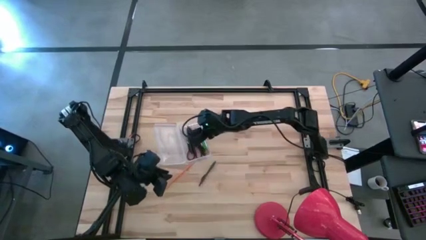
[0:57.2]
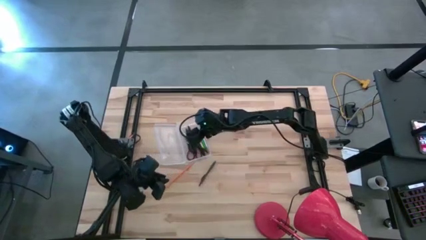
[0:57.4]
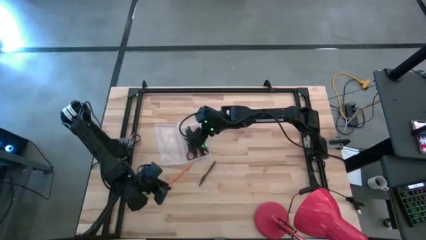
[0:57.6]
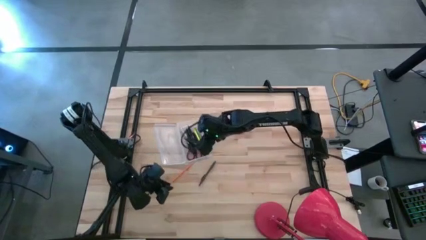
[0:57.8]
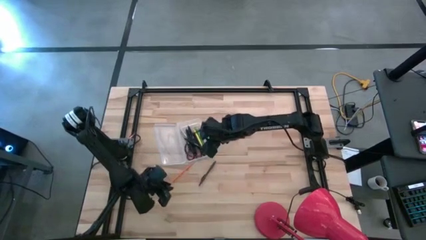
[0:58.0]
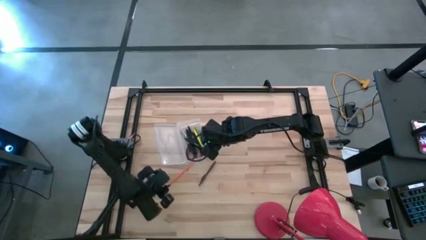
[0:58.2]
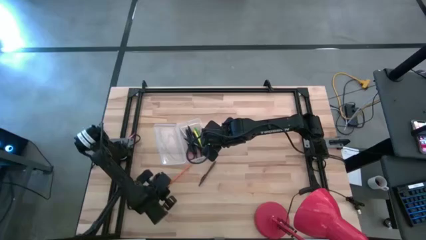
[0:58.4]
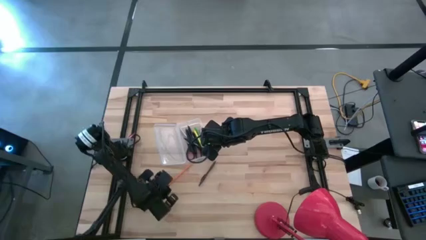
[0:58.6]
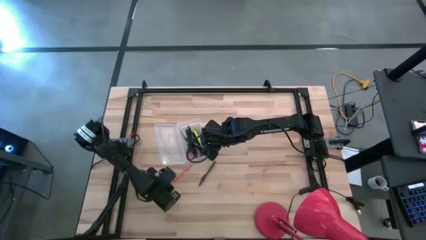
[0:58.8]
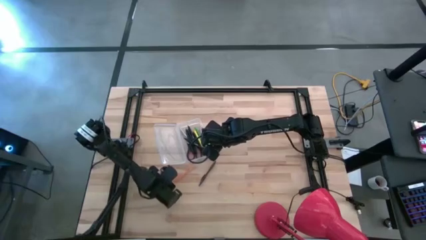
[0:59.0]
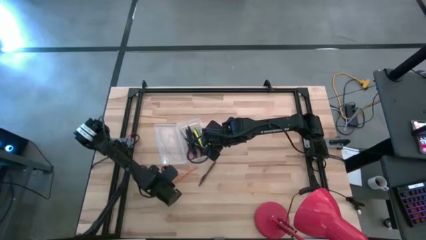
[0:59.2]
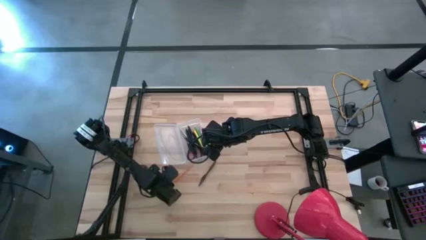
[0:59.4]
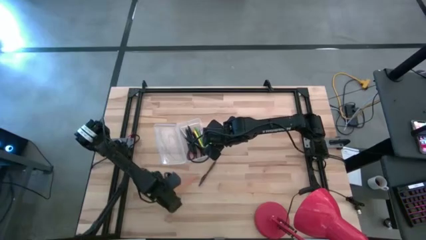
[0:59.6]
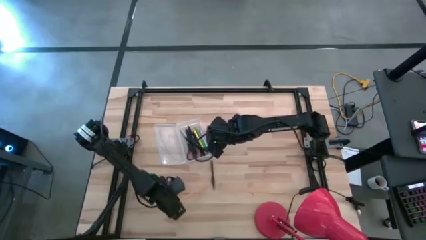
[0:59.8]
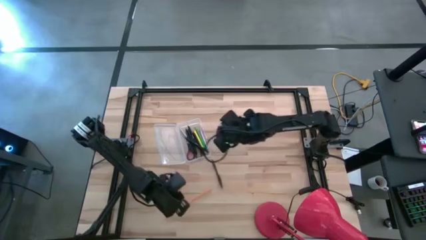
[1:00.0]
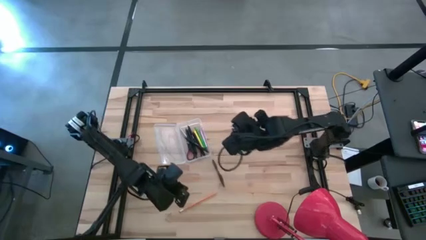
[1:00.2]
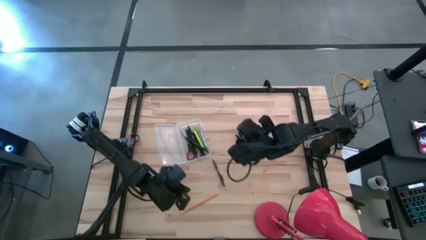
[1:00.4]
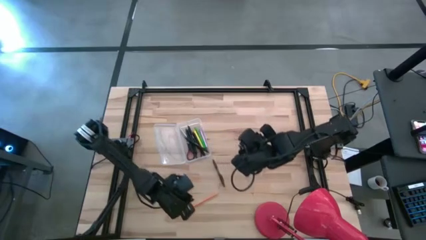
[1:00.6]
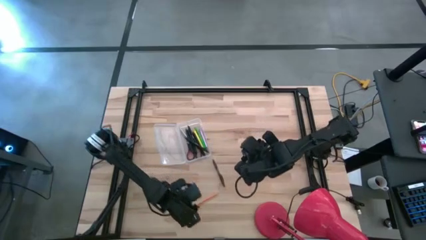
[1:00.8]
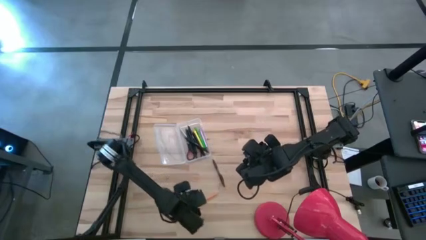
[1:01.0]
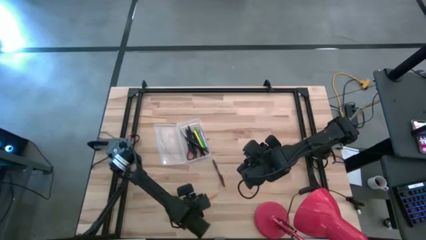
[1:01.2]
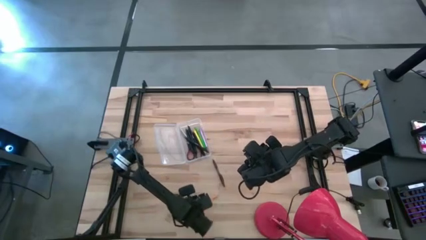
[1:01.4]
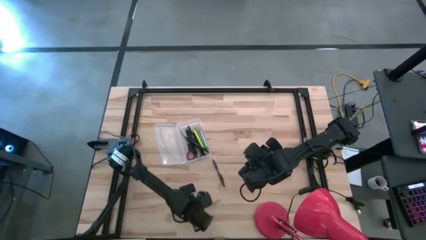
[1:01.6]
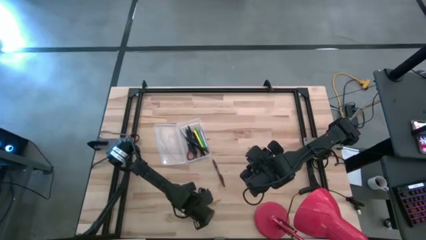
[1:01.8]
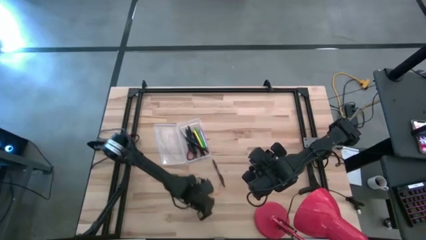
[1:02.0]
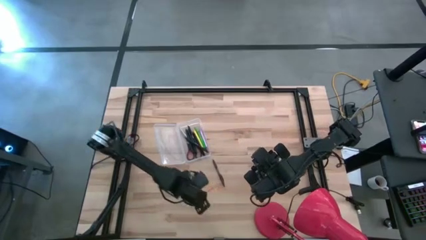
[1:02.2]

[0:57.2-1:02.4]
Task: Pick & place school supplies into a supply box
Put the orange pencil into the transparent supply box

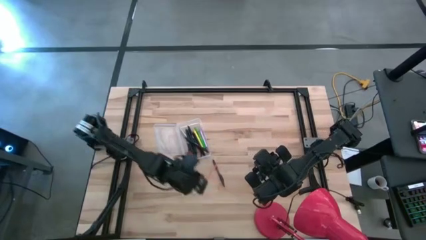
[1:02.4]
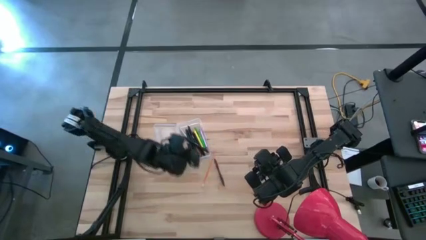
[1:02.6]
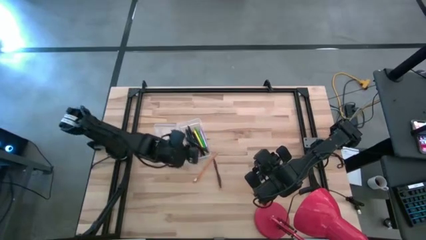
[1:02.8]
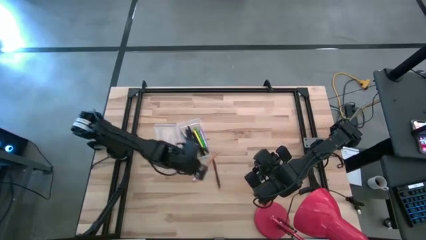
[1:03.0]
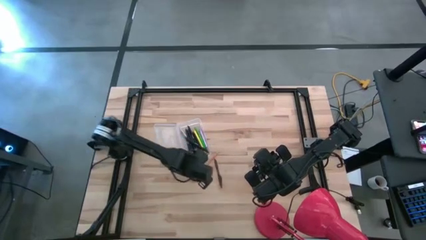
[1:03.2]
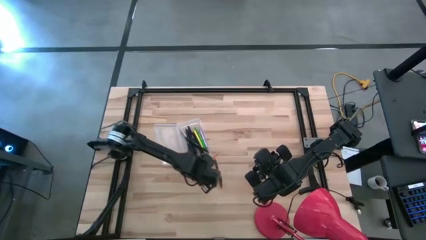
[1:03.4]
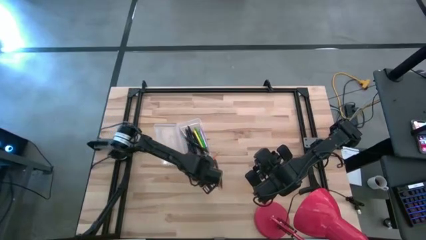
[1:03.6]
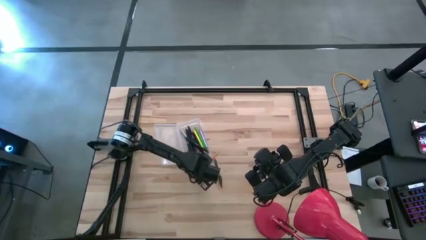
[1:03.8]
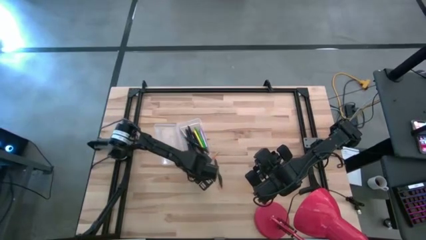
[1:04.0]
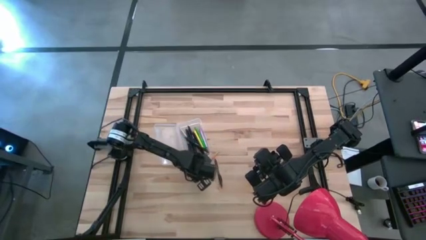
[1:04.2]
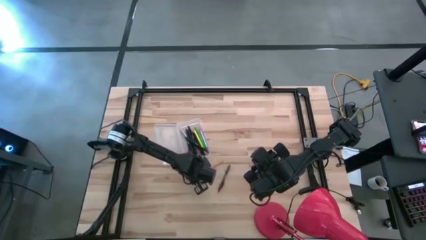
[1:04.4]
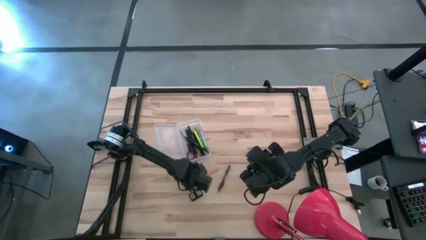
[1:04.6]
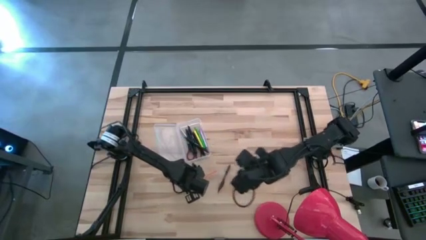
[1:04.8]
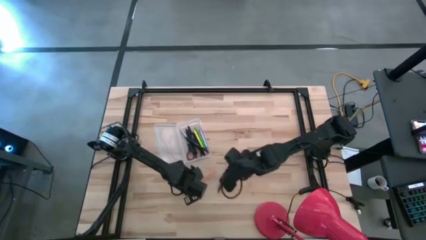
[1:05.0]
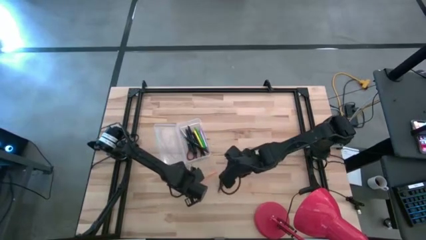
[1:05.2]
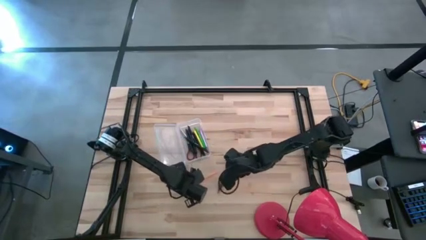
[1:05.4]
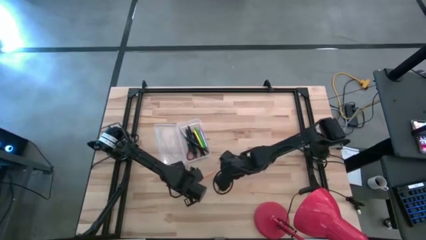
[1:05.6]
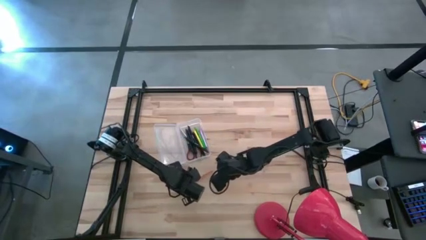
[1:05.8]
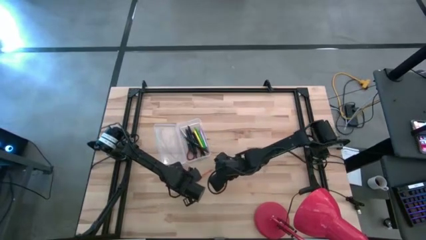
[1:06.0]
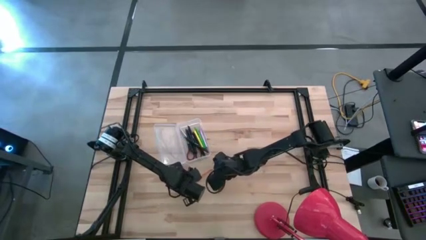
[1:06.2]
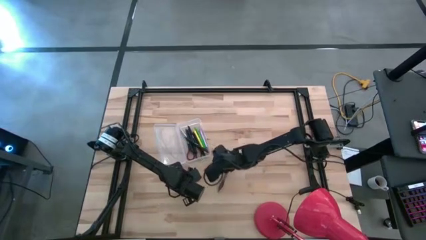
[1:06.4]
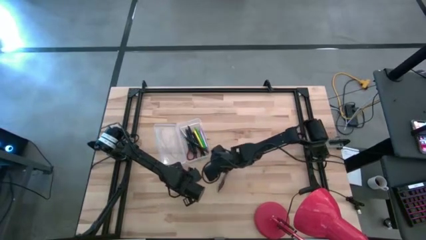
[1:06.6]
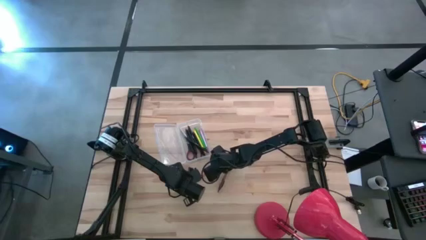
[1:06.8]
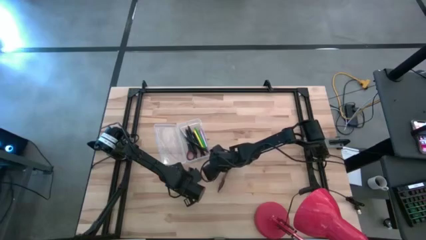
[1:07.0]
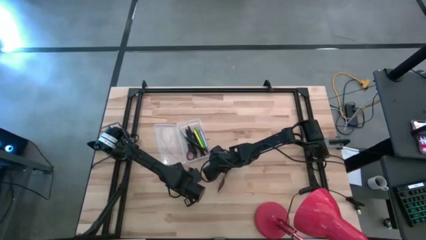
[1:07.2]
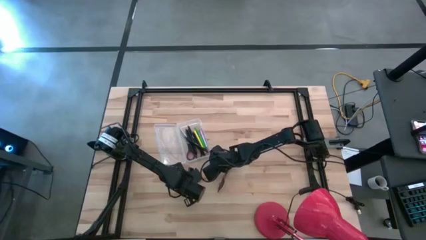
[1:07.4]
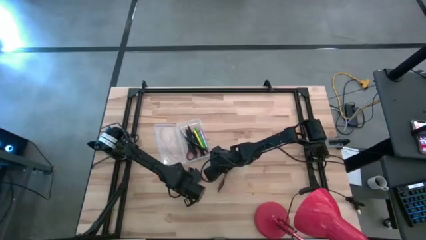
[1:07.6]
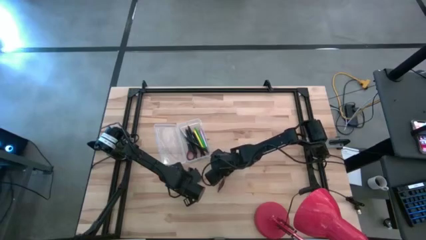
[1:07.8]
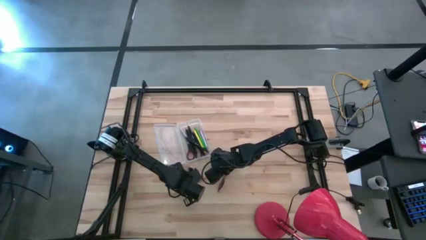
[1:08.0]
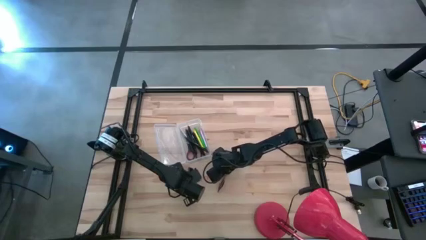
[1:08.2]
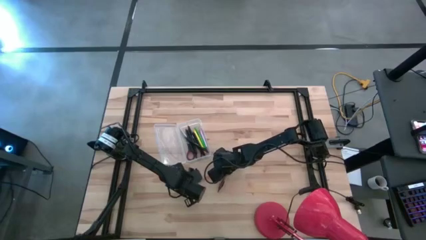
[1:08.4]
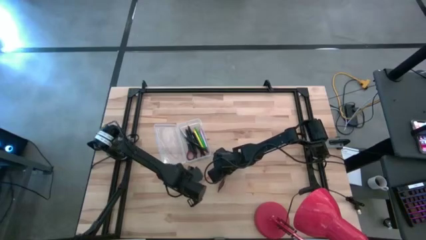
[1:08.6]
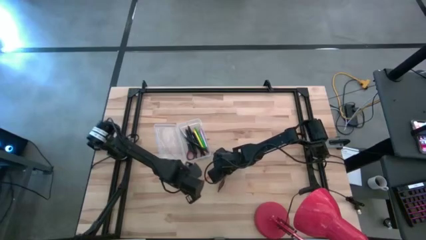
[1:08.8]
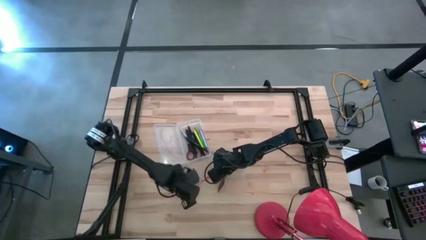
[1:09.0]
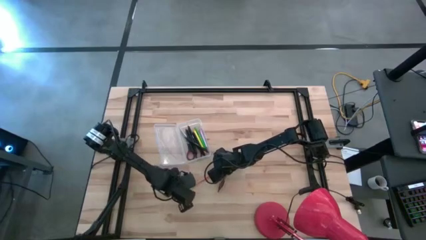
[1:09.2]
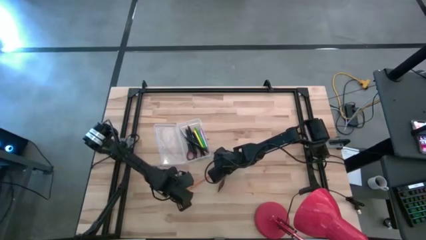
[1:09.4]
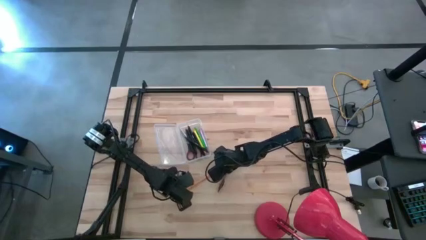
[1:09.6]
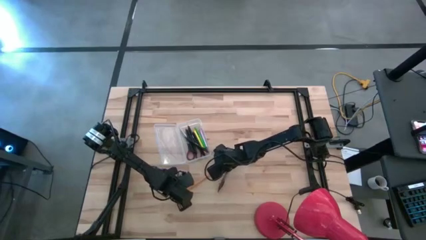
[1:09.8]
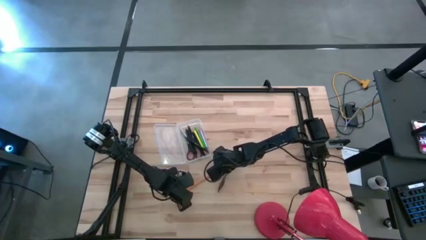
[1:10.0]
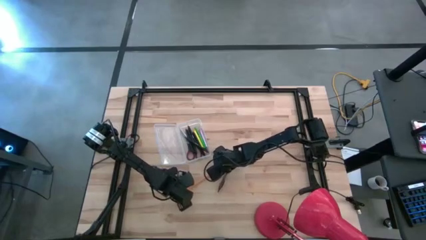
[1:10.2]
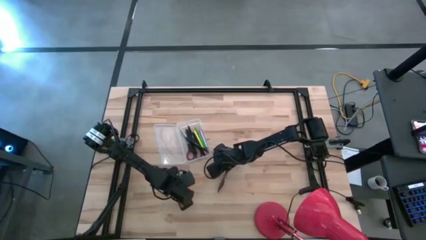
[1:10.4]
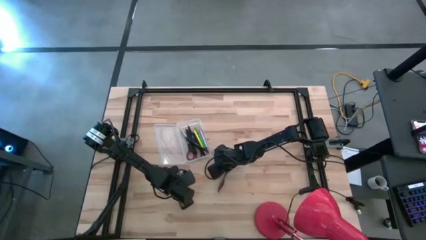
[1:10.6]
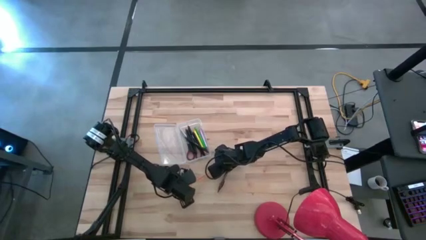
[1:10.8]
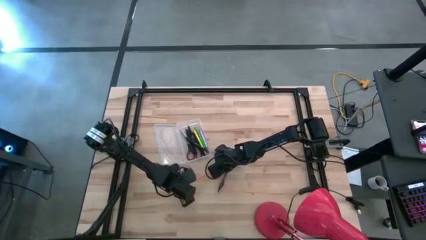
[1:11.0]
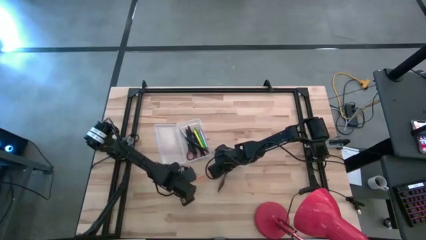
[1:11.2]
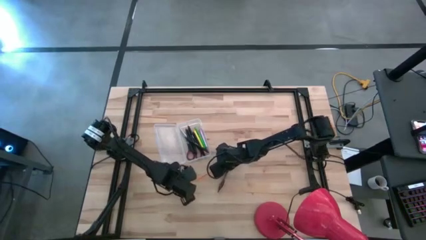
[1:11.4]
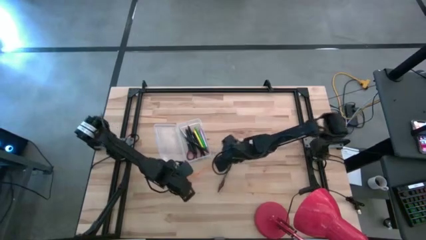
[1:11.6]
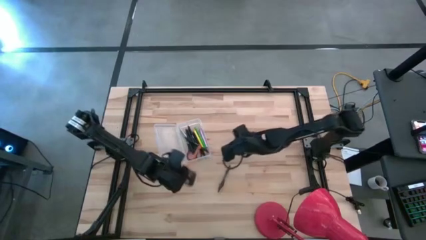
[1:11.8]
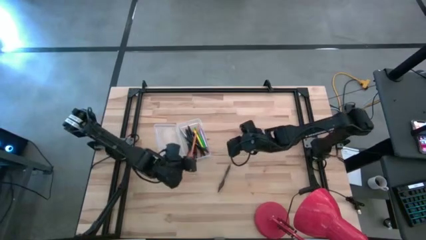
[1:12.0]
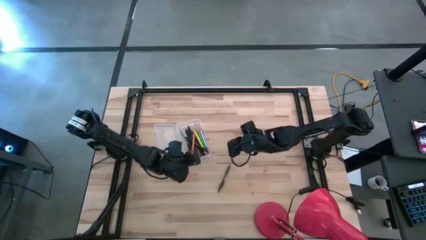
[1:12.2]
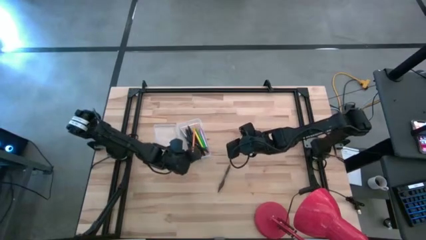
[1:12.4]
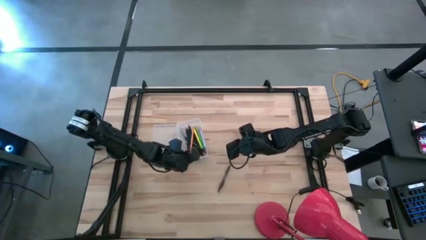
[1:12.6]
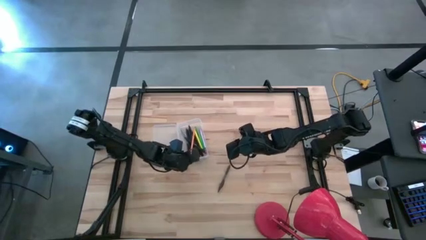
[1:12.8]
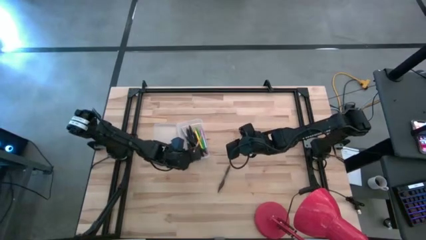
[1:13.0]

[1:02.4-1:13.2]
Put the orange pencil into the transparent supply box

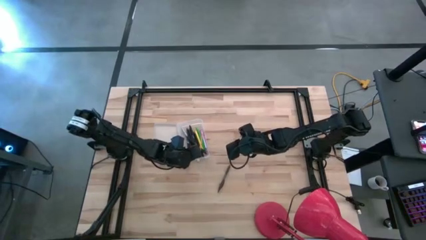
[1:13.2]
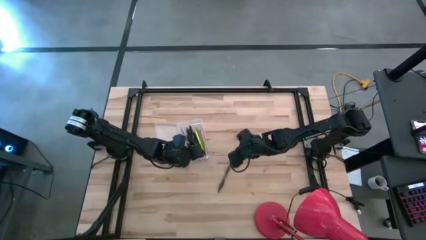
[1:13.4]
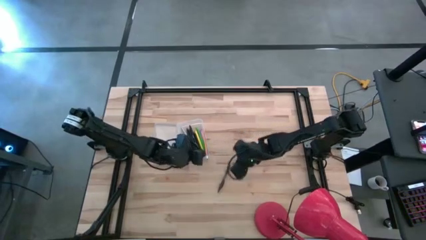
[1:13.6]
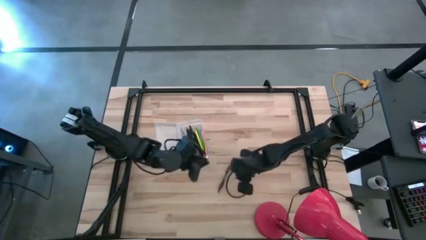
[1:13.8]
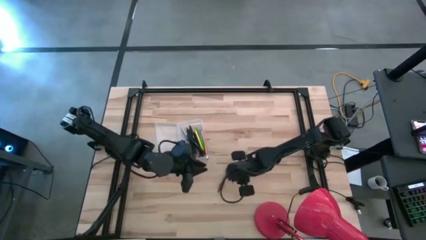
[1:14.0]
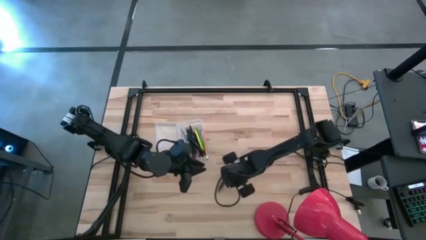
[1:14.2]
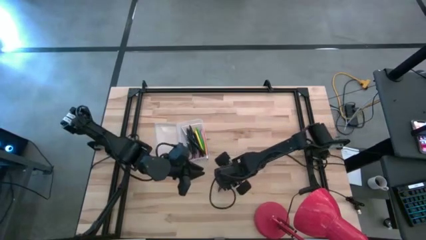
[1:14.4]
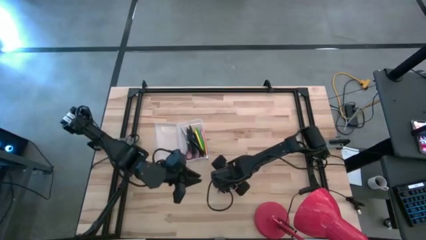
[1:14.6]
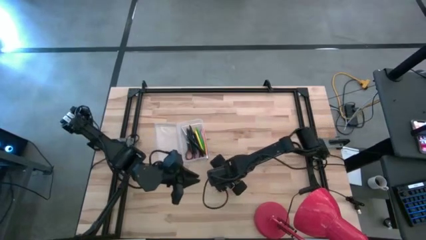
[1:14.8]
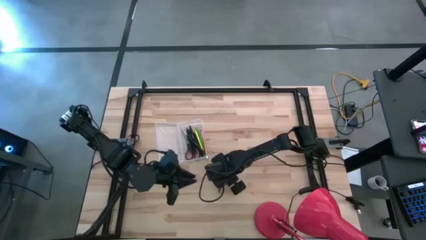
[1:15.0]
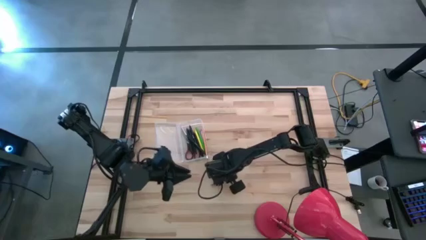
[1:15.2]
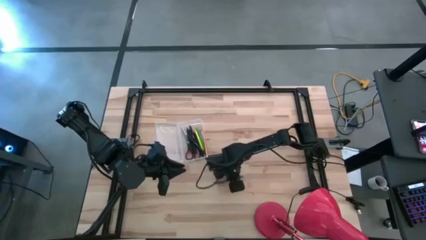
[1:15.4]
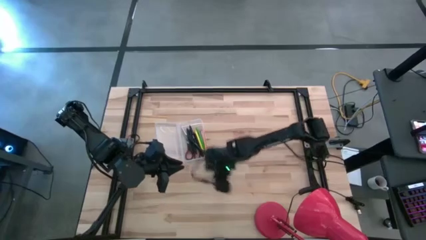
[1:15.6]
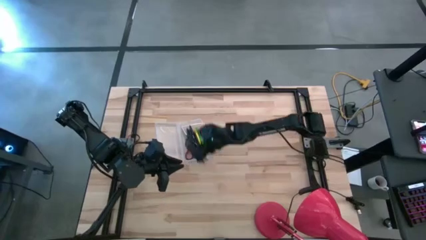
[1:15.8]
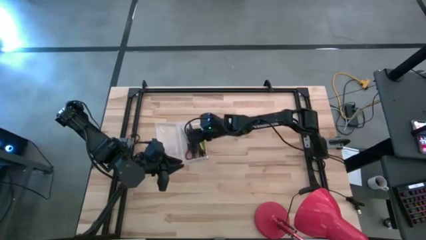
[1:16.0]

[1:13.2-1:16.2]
Put the brown pen into the transparent supply box
